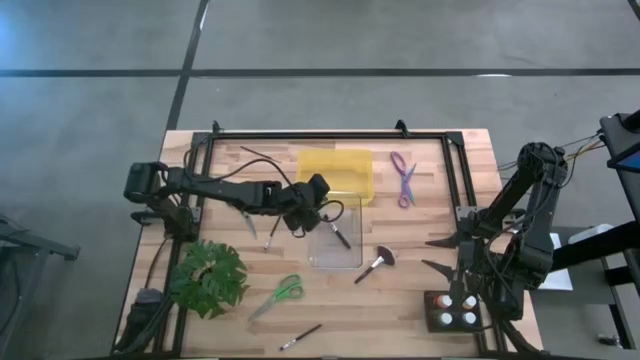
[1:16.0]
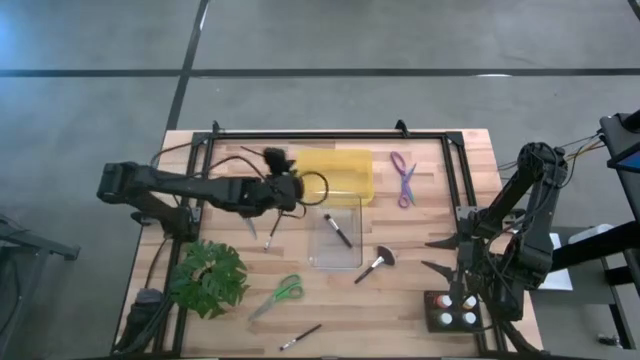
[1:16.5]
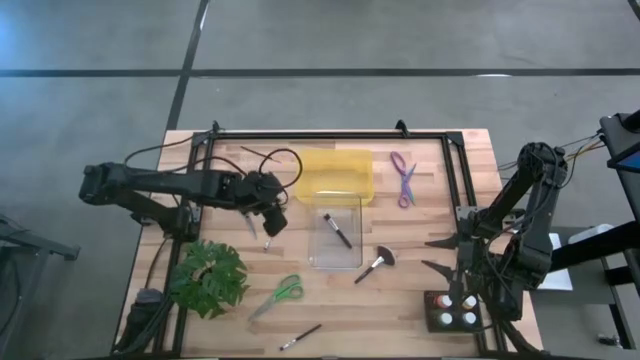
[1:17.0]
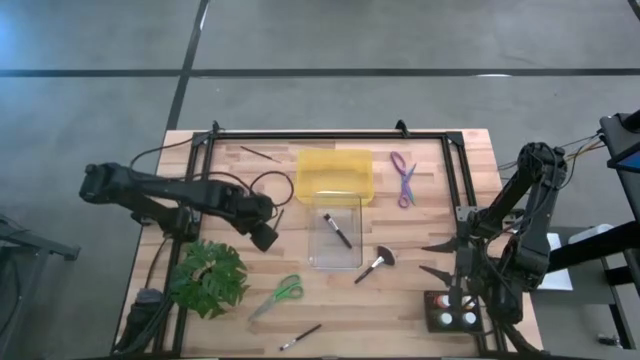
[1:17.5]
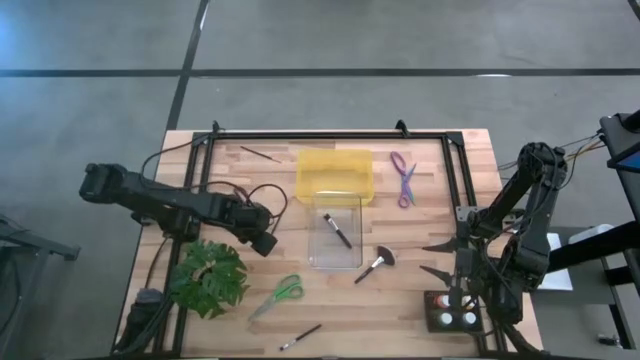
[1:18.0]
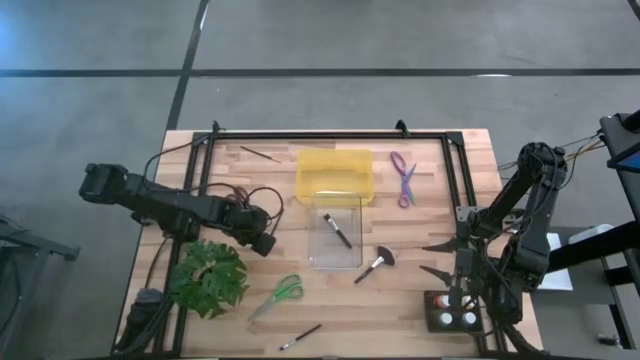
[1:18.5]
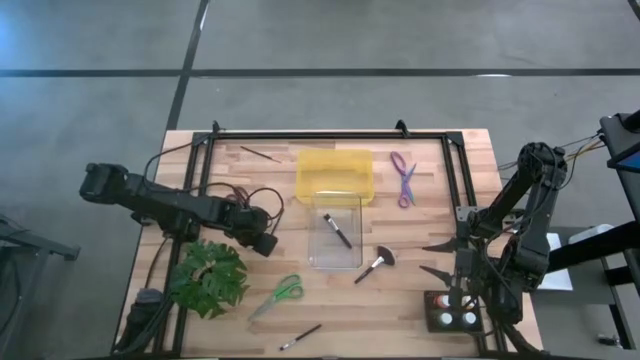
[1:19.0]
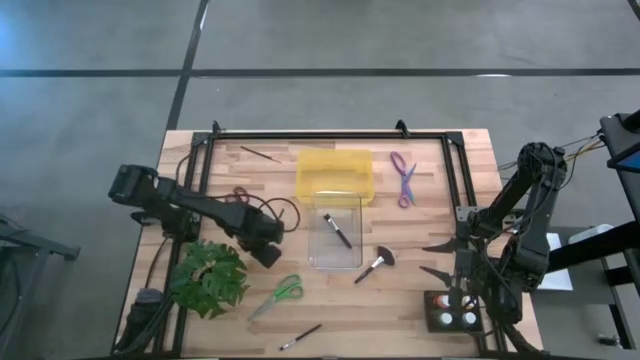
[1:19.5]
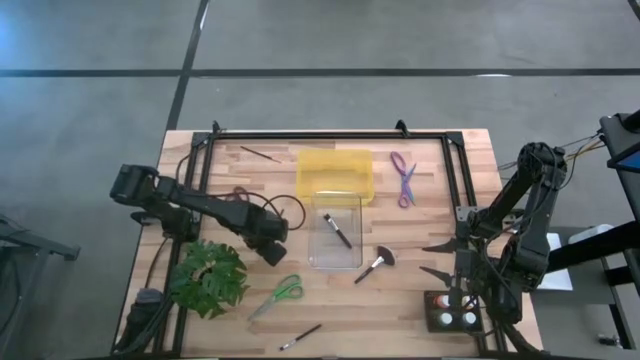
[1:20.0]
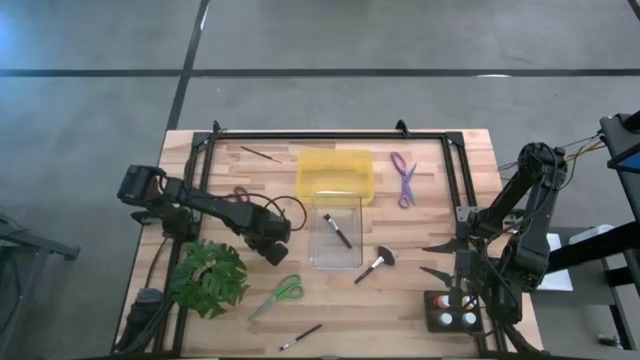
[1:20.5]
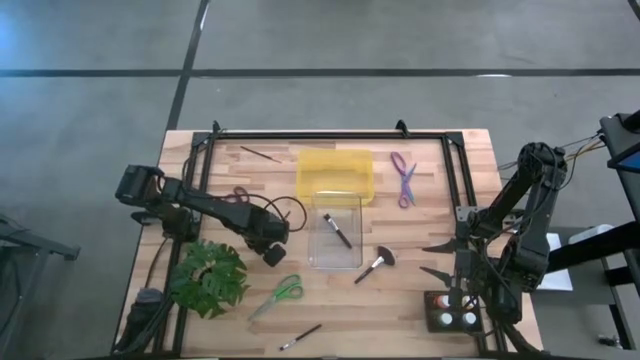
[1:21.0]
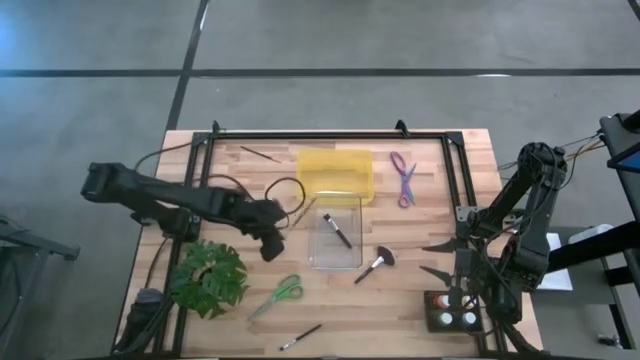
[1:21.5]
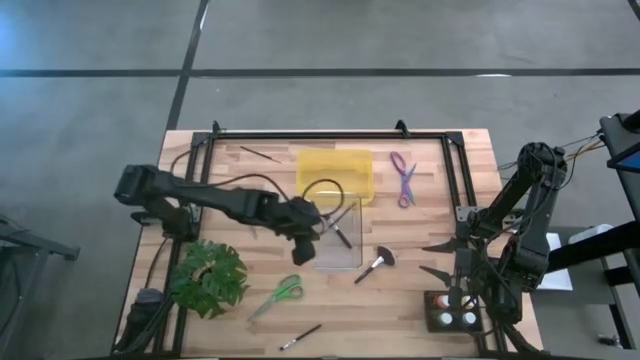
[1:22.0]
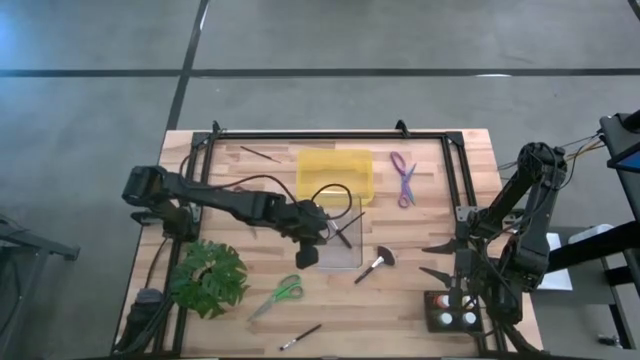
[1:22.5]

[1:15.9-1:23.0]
Task: Pick & Place Paint Supplies
Put the silver eyeshadow brush into the transparent bin

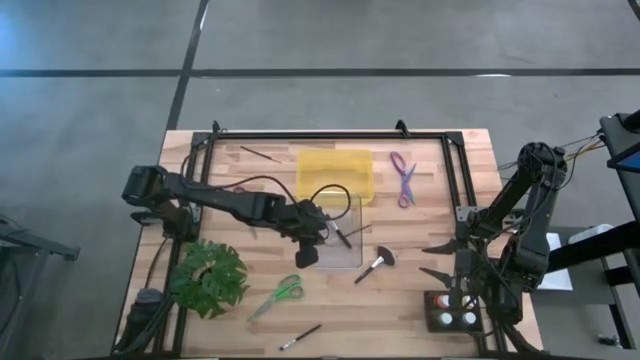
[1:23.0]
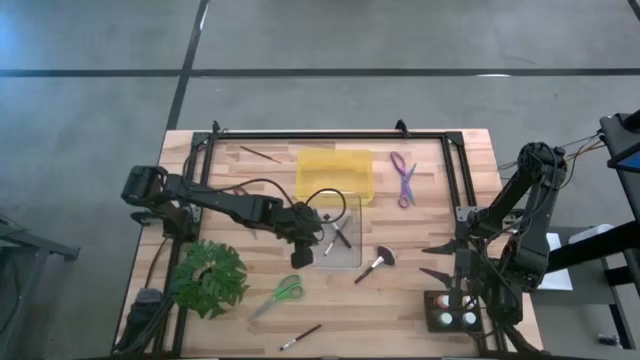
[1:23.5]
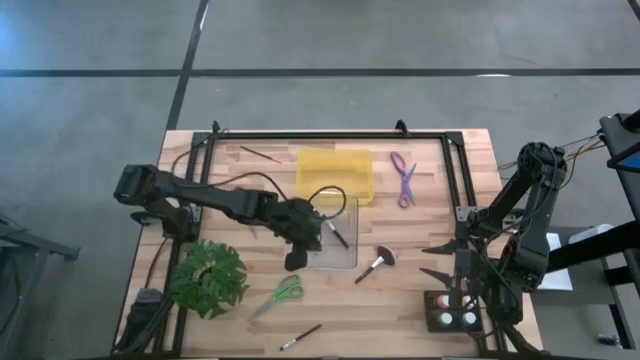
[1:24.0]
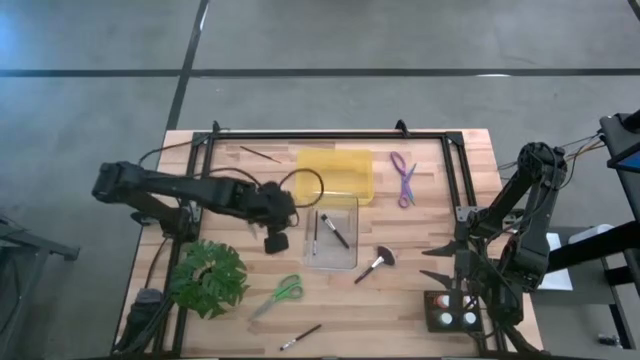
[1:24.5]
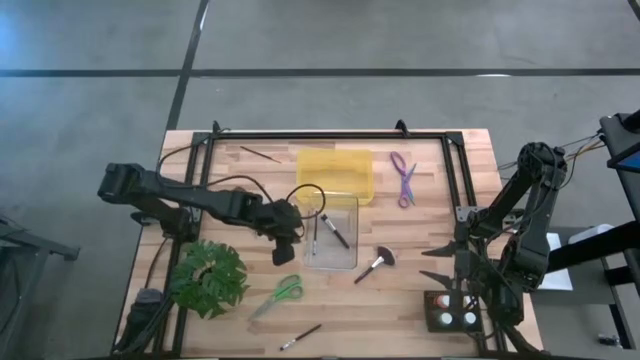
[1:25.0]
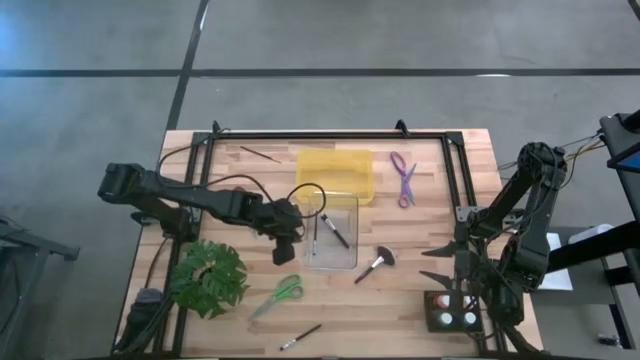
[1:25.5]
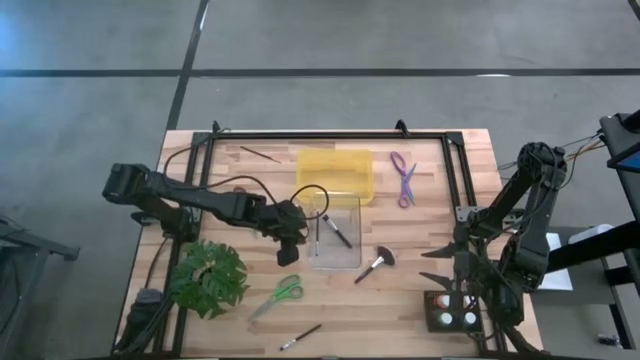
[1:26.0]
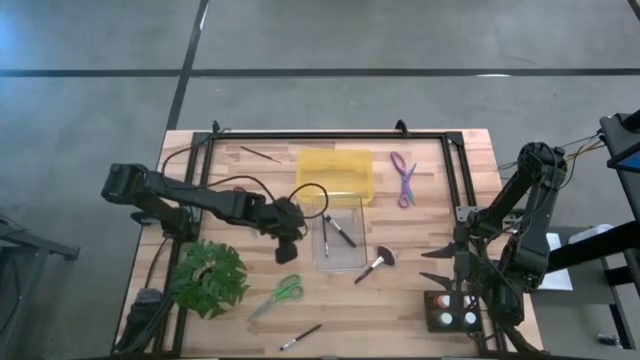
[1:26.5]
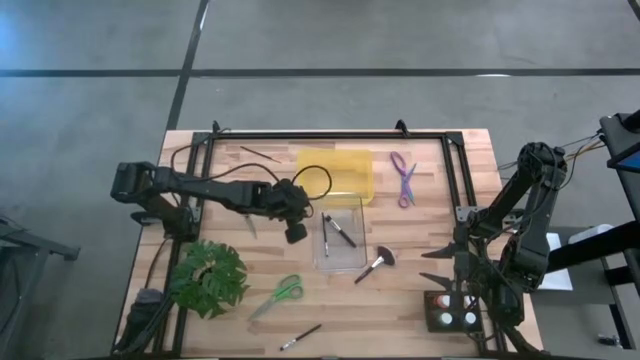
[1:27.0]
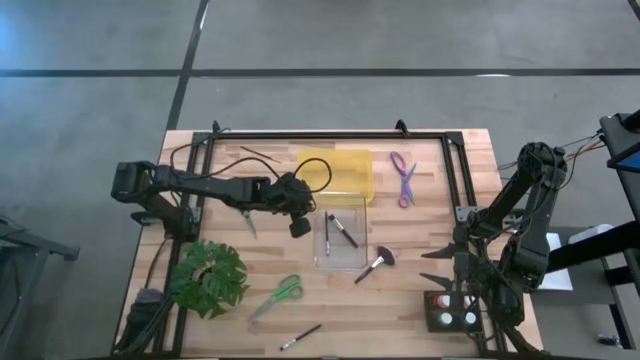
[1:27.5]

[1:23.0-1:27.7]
Adjust the transparent bin

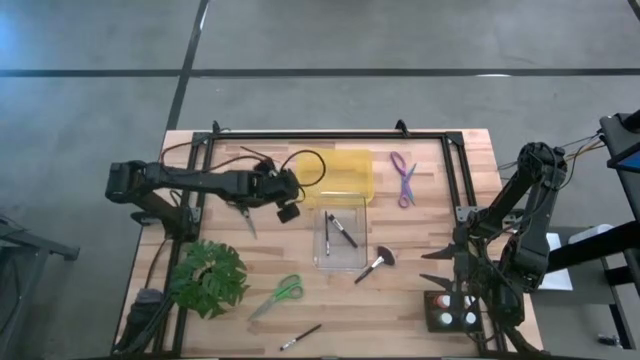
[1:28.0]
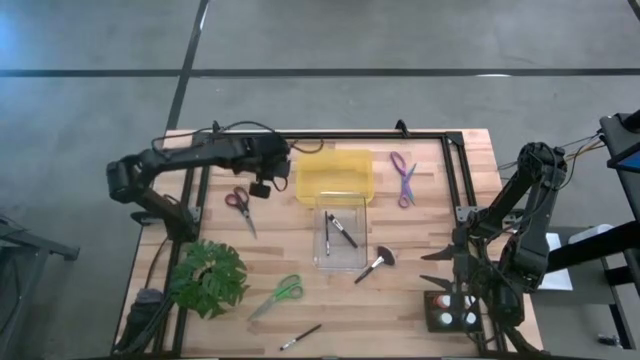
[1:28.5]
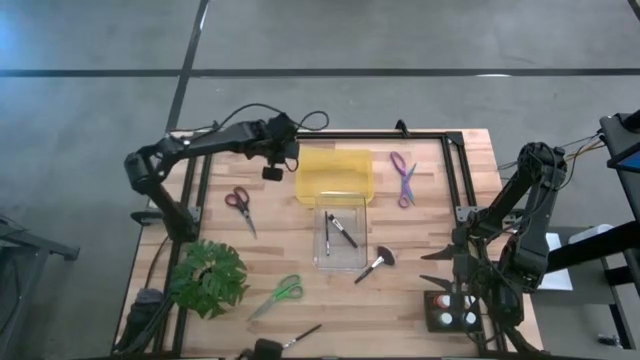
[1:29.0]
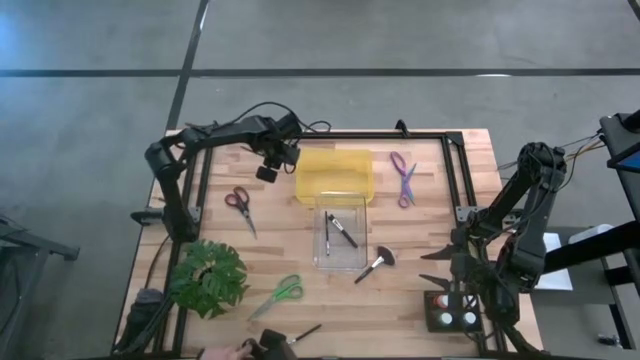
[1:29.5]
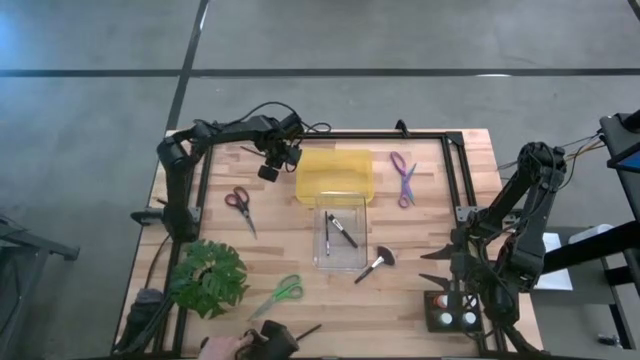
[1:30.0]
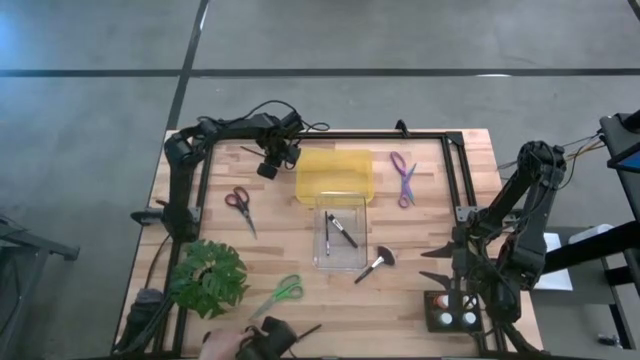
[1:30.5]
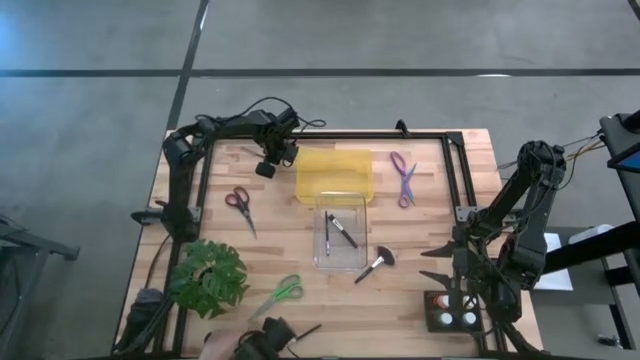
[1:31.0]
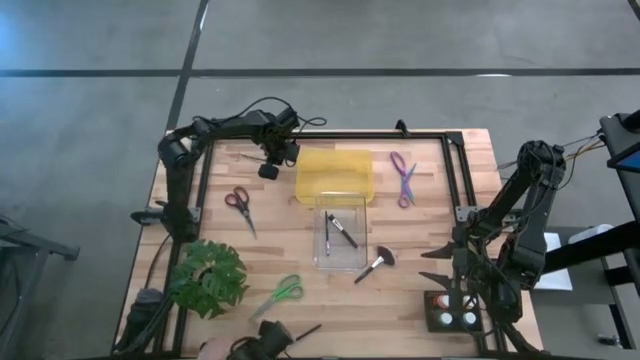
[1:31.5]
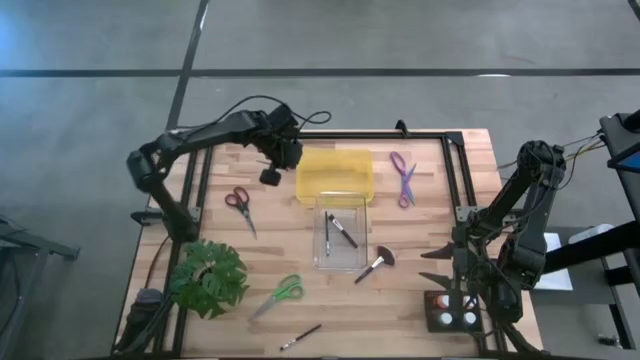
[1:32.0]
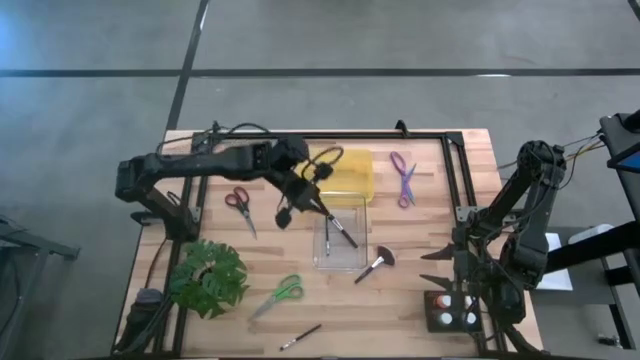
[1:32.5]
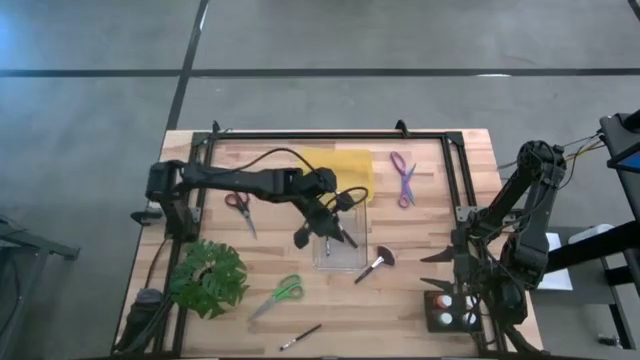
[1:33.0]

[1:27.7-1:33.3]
Put the golden paint brush into the transparent bin

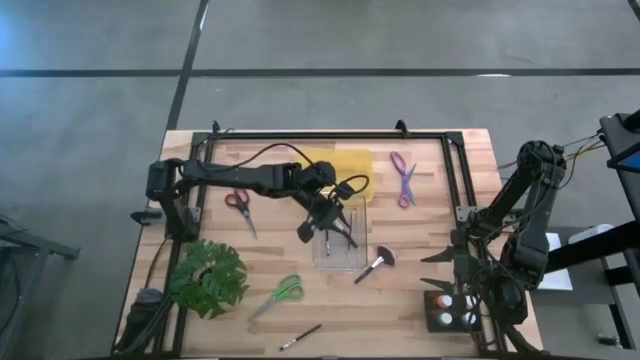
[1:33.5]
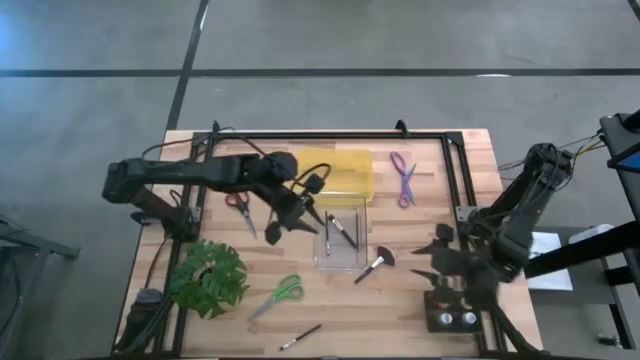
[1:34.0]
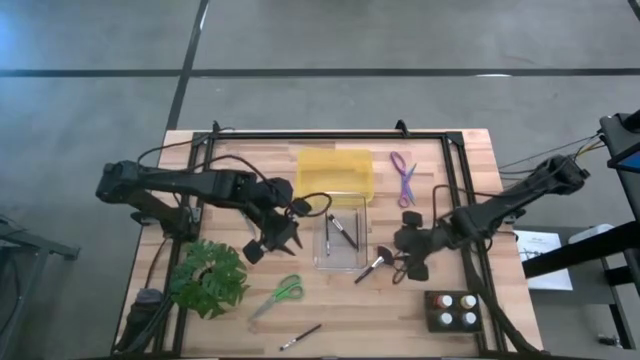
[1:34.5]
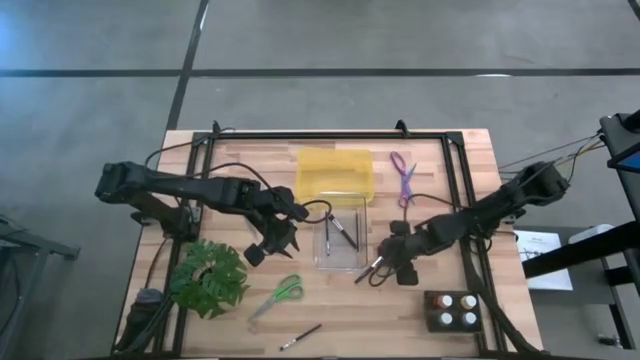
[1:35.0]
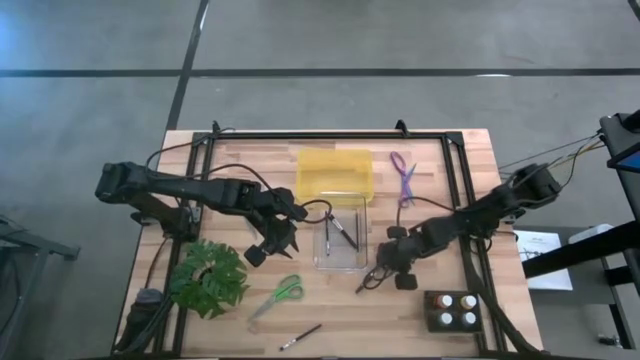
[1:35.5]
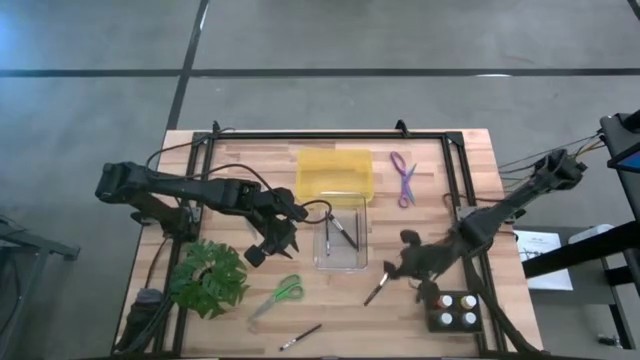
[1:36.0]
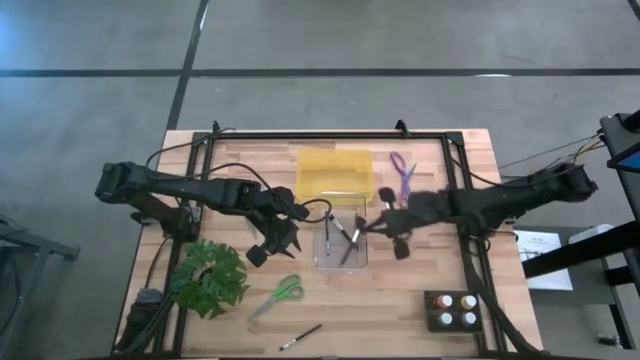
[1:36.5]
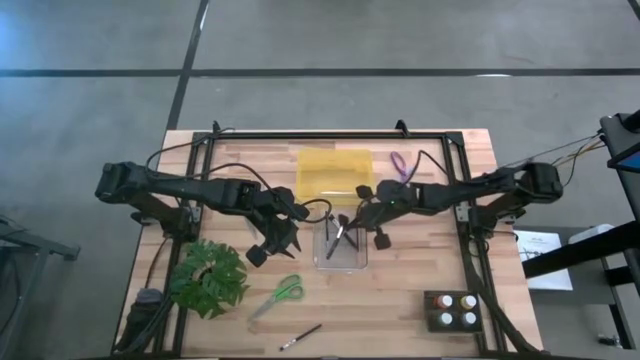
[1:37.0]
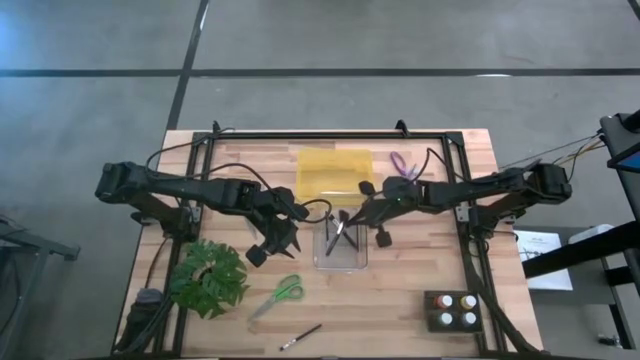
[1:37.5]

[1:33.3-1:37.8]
Put the silver highlighter brush into the transparent bin
